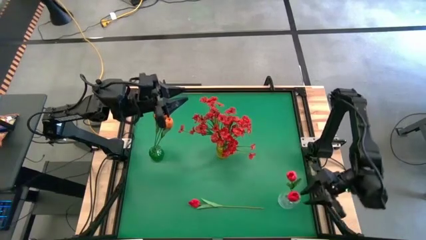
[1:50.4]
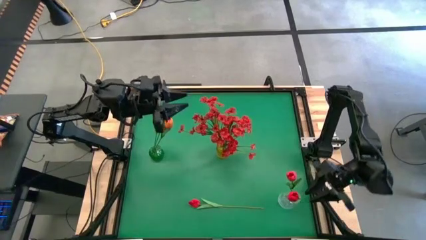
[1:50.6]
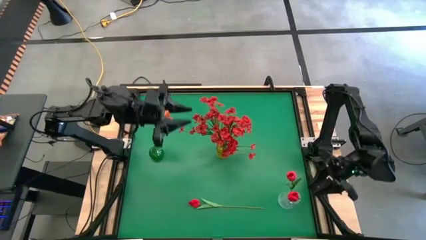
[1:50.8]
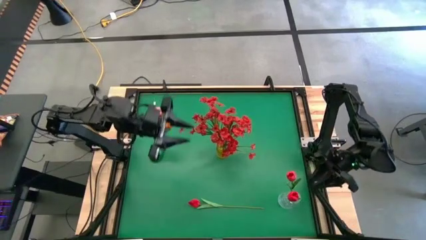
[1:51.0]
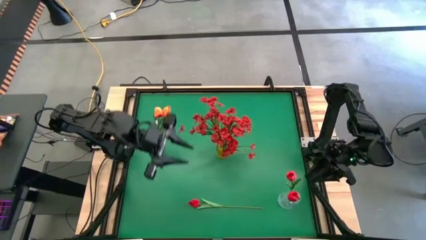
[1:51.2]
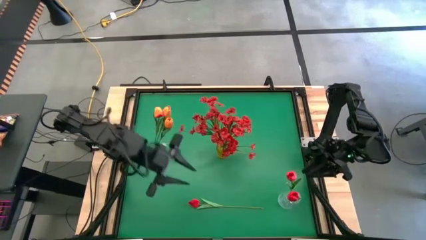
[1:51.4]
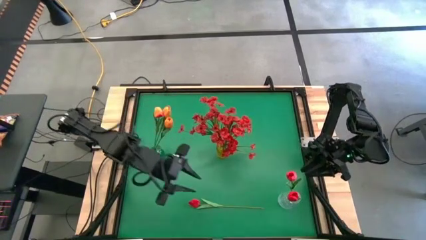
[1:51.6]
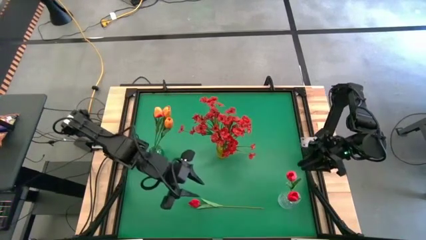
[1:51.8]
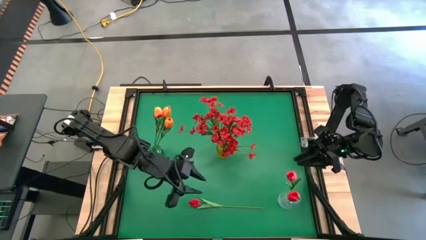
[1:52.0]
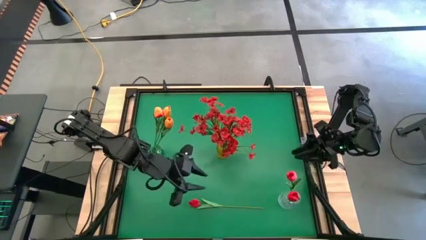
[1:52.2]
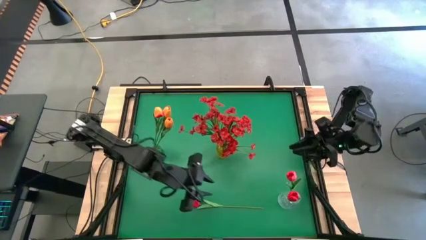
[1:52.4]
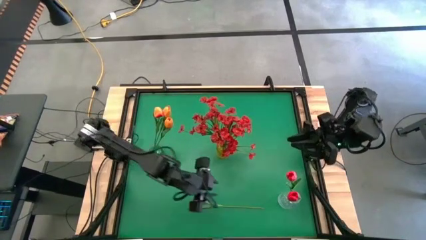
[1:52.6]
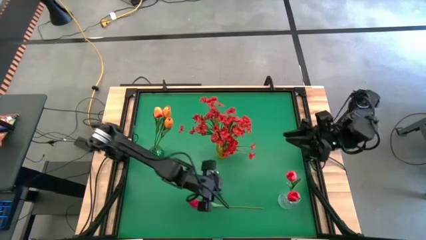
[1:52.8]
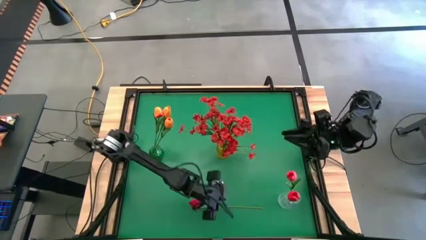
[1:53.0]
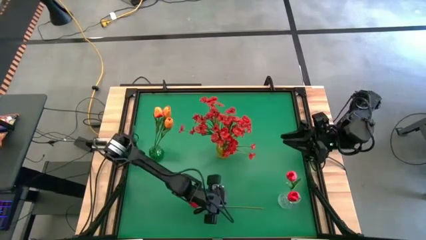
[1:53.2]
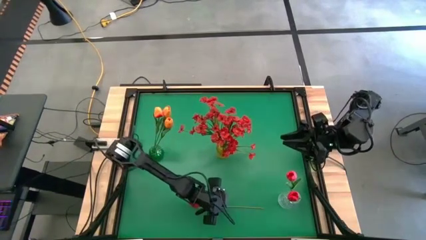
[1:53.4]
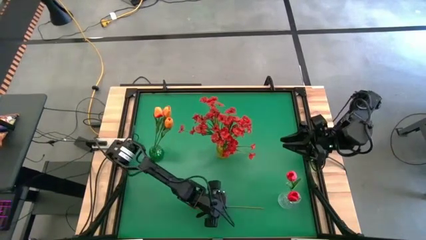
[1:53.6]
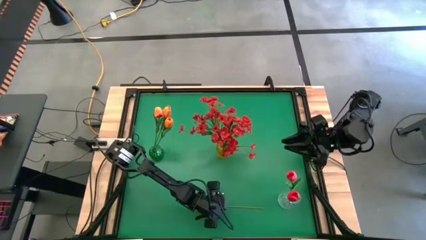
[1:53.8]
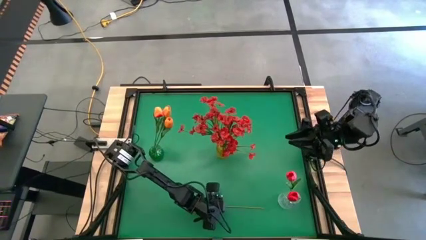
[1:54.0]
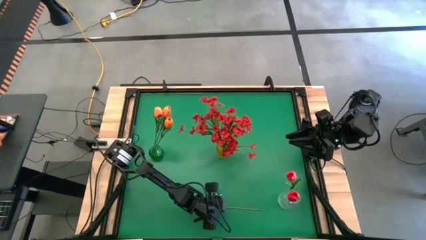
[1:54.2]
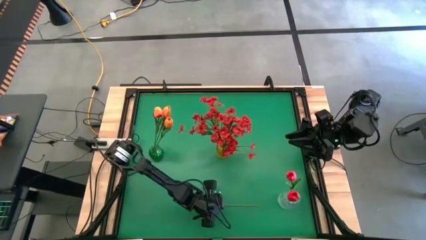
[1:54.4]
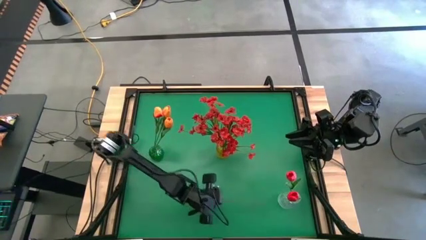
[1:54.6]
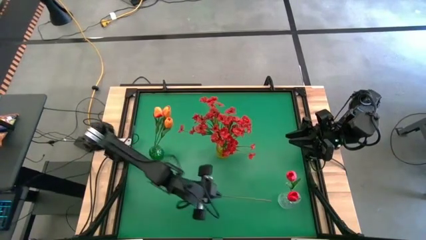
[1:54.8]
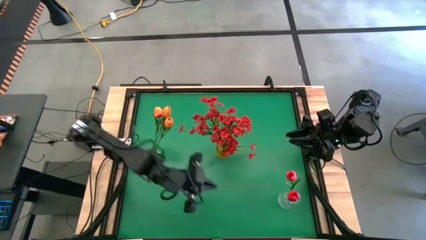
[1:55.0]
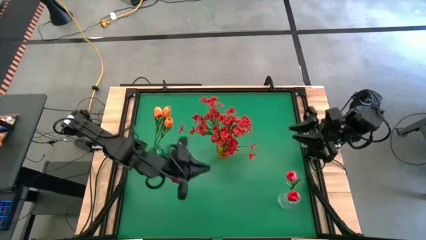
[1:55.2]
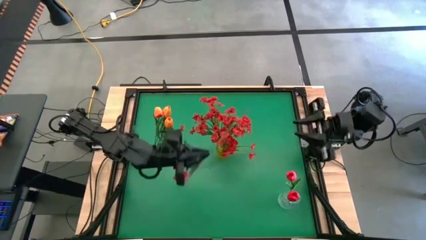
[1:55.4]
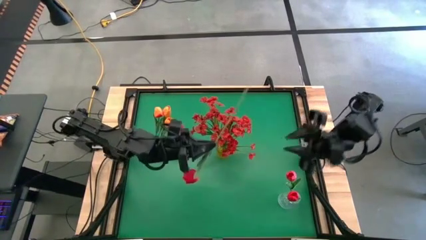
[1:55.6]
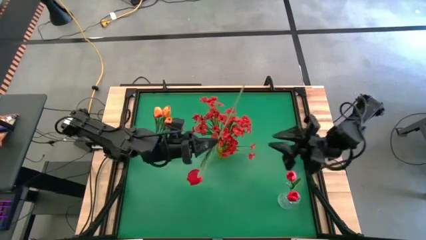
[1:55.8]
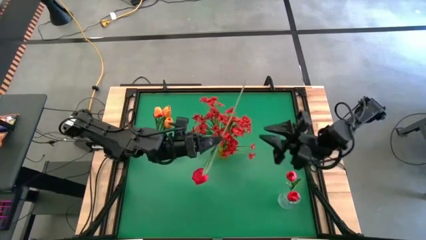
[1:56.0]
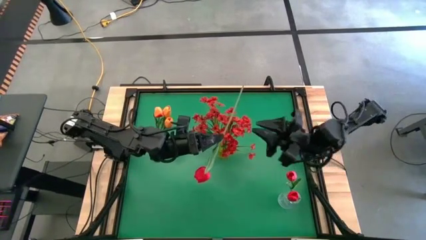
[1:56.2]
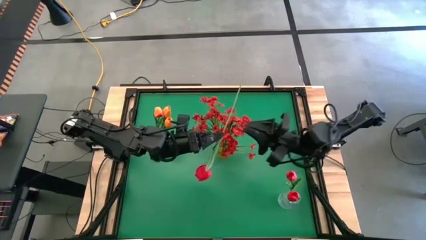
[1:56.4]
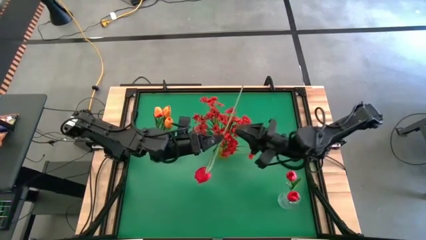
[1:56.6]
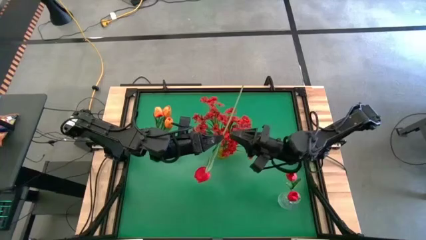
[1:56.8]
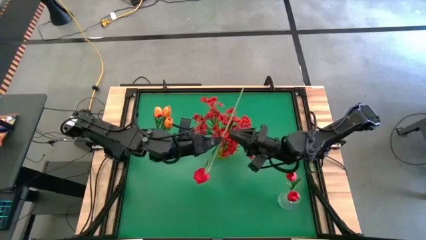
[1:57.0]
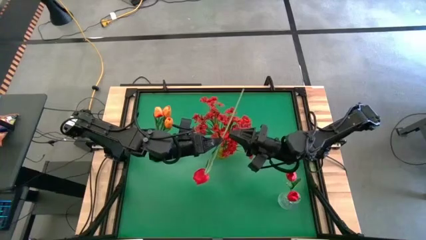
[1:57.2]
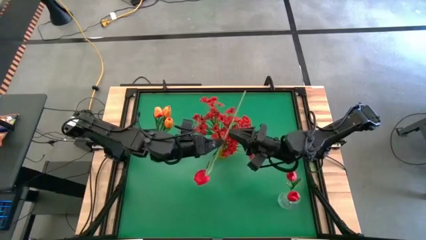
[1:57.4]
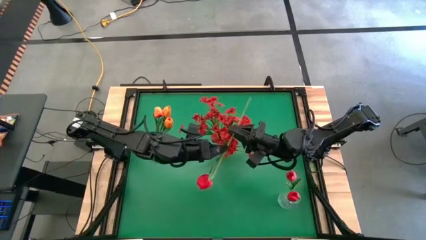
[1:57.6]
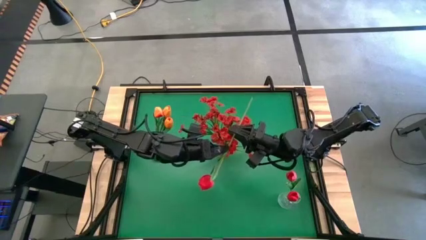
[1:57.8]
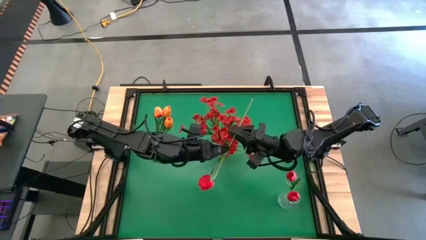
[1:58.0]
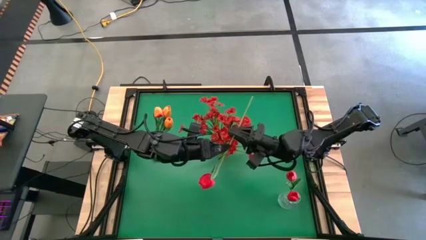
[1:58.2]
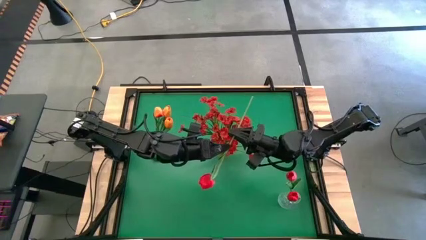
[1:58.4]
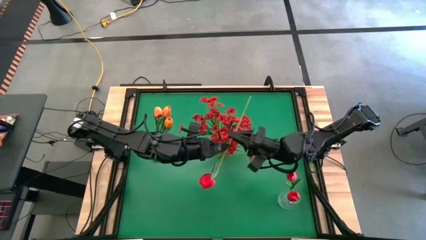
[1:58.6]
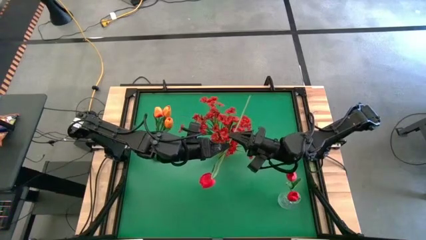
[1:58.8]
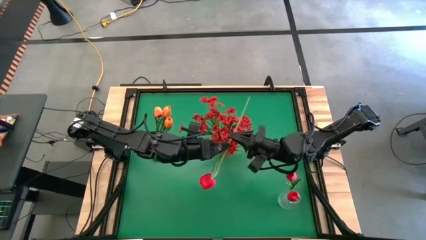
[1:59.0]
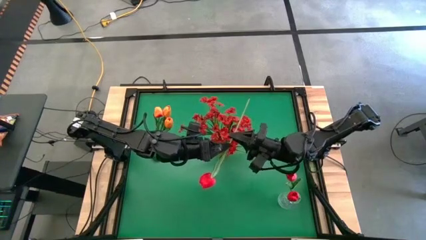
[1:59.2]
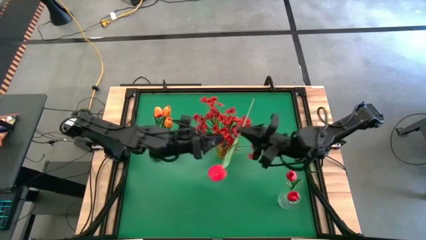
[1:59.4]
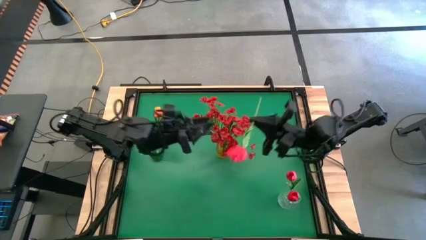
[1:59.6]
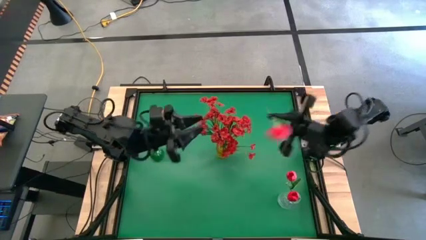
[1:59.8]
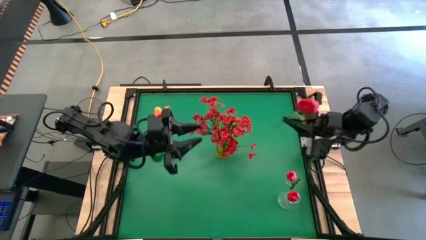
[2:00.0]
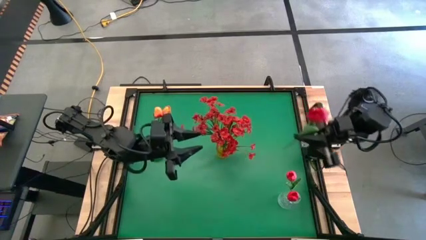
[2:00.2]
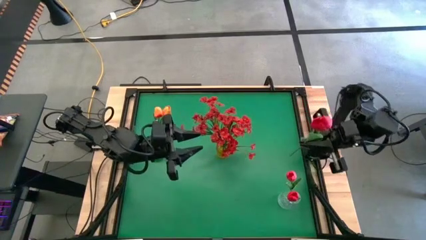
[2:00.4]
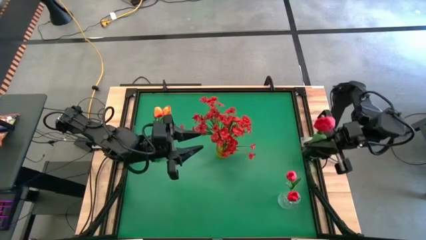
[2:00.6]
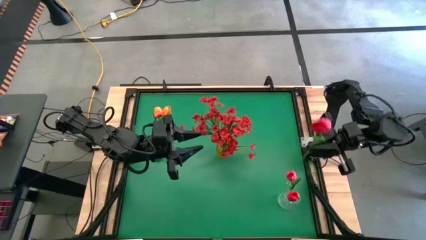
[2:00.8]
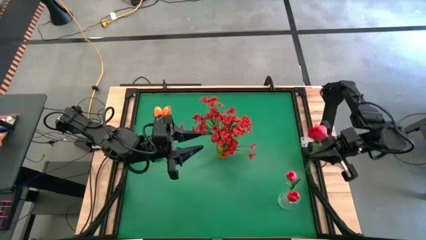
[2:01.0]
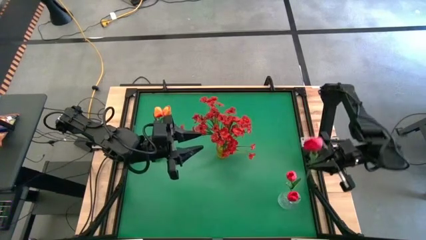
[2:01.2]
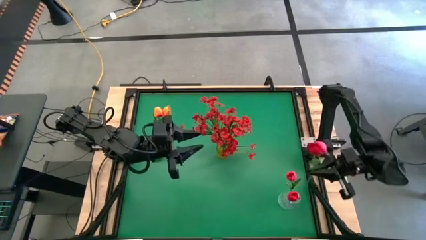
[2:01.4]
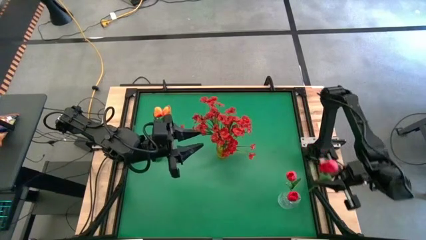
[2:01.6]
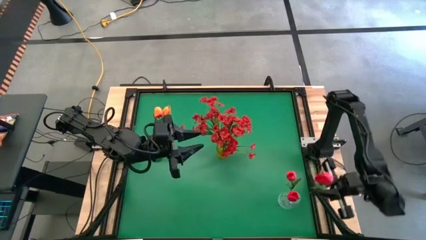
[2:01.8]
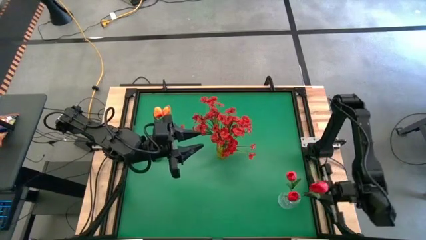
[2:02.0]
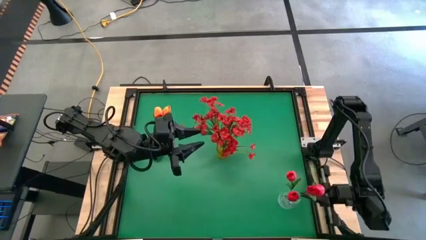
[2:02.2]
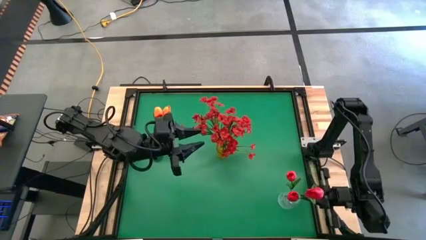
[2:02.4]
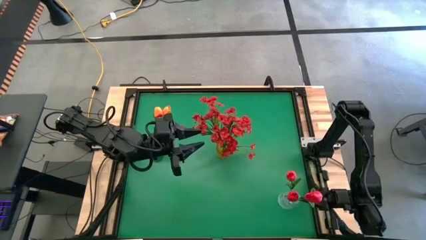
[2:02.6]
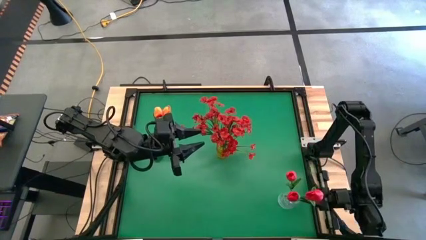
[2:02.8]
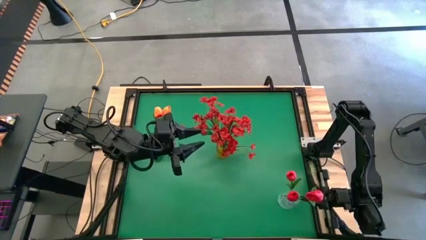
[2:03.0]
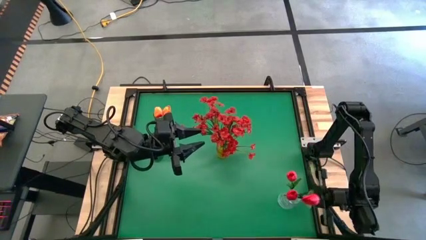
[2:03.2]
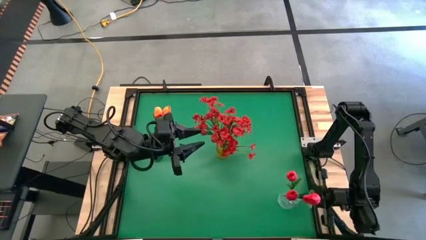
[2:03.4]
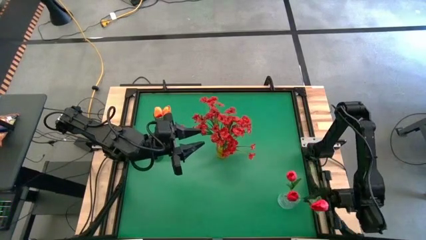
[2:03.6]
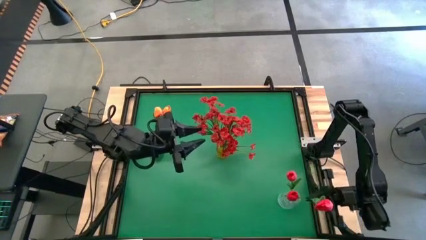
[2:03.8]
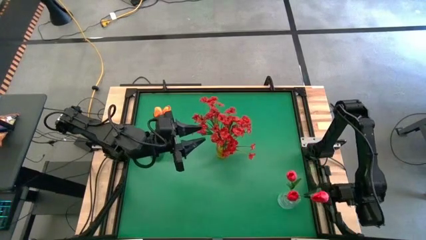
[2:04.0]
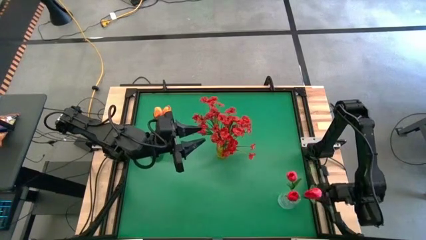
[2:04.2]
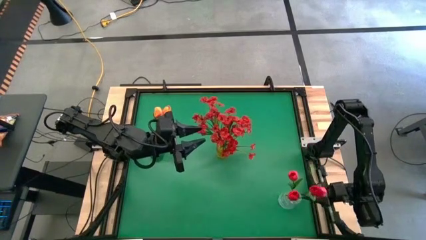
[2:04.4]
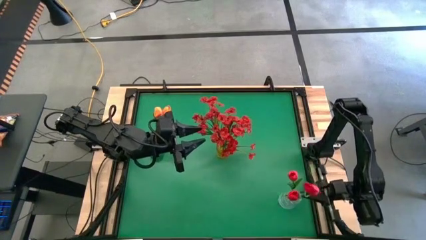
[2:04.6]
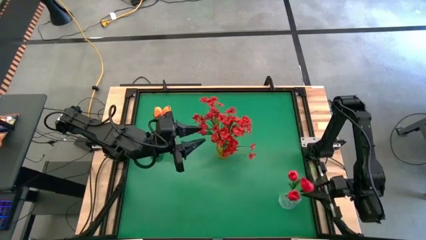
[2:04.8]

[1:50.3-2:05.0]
Task: Sort flowers into vase by color
Put the red flower into the transparent vase
